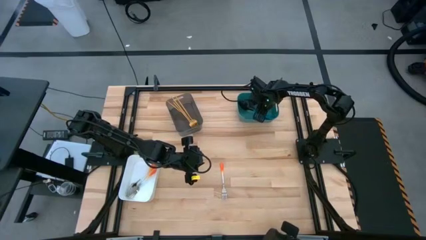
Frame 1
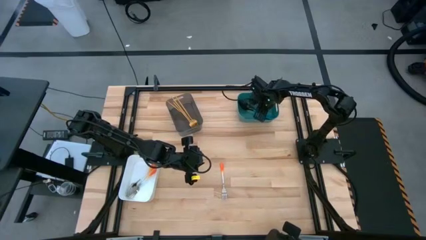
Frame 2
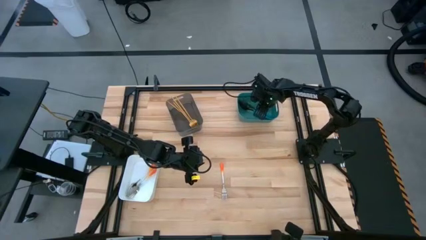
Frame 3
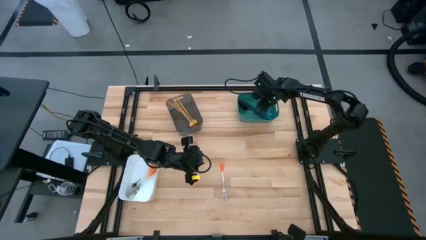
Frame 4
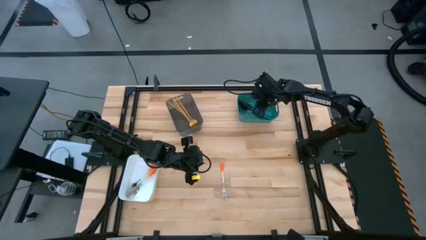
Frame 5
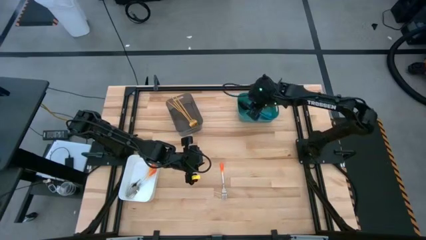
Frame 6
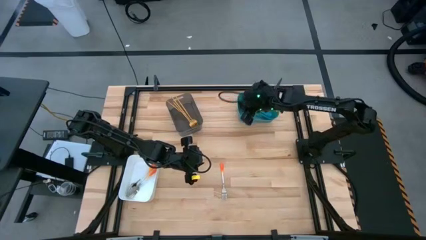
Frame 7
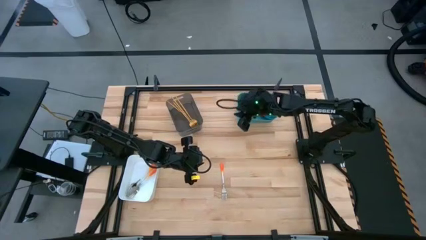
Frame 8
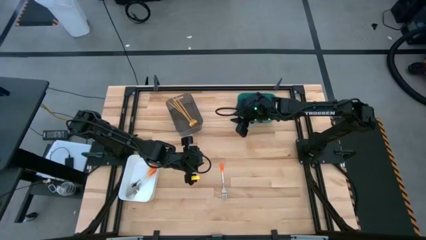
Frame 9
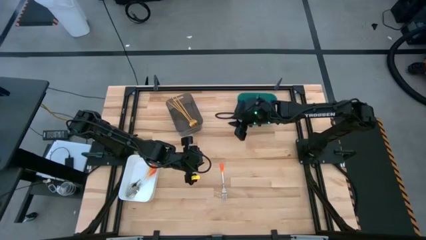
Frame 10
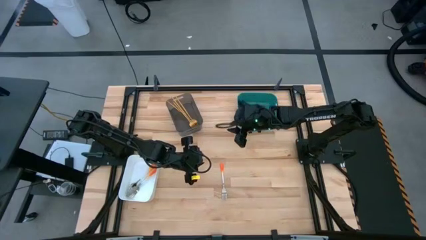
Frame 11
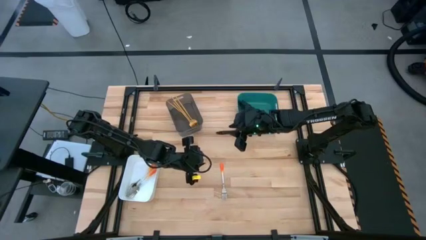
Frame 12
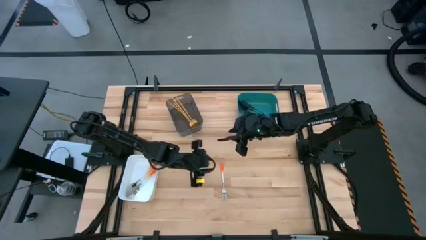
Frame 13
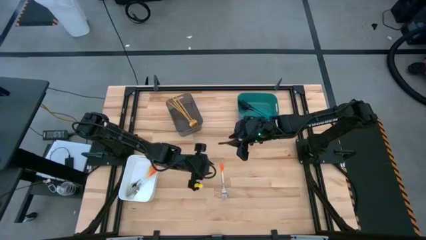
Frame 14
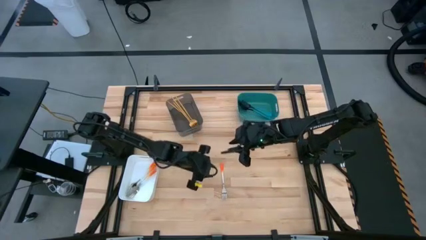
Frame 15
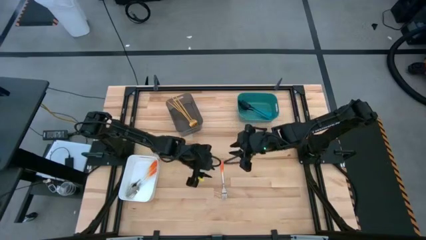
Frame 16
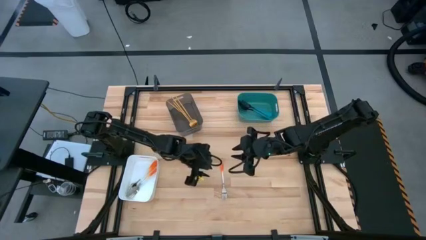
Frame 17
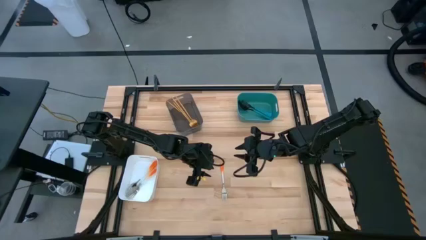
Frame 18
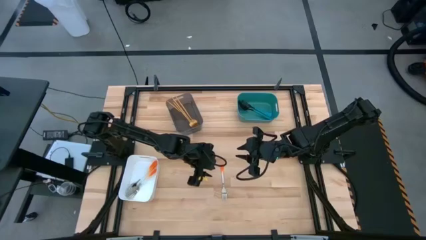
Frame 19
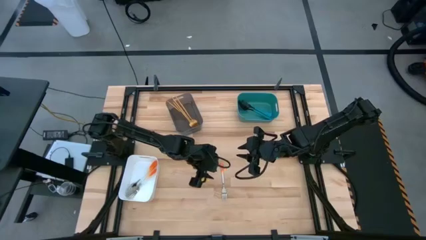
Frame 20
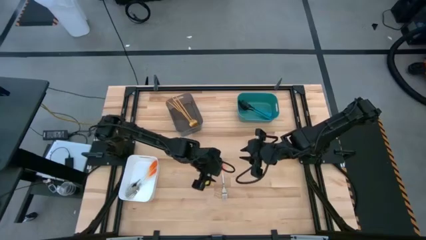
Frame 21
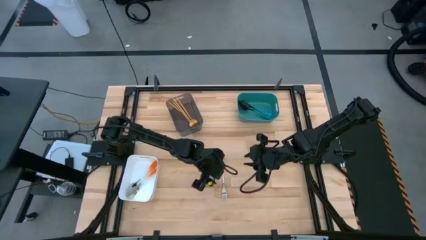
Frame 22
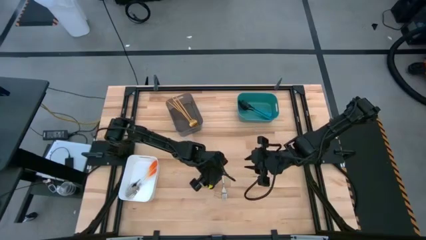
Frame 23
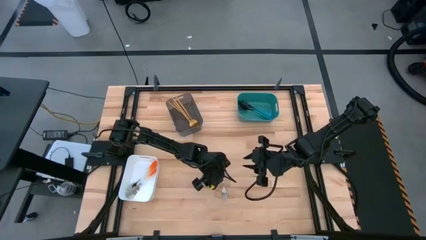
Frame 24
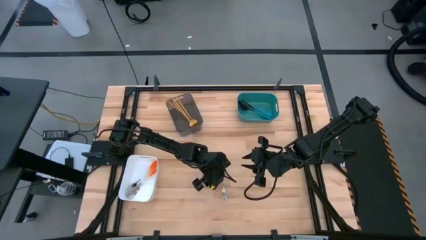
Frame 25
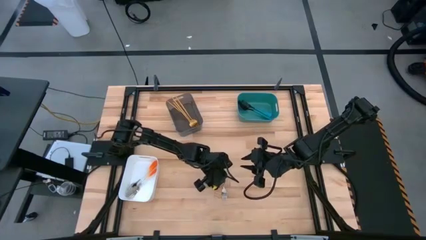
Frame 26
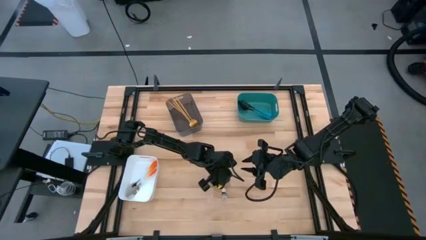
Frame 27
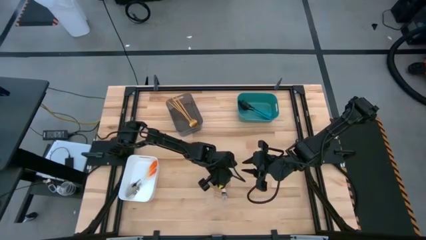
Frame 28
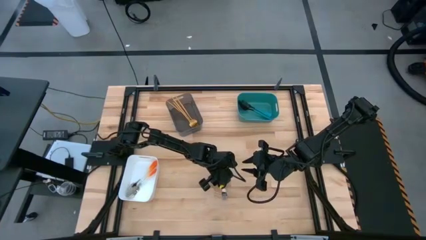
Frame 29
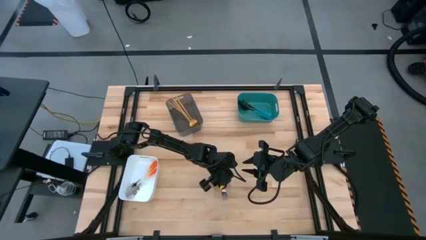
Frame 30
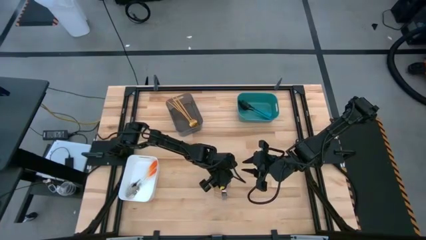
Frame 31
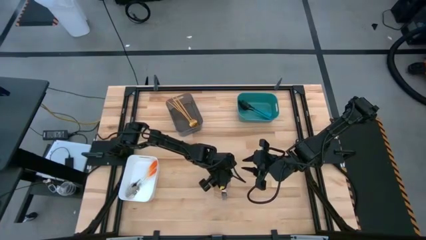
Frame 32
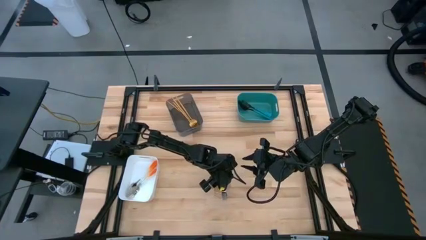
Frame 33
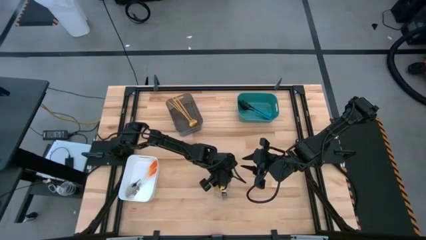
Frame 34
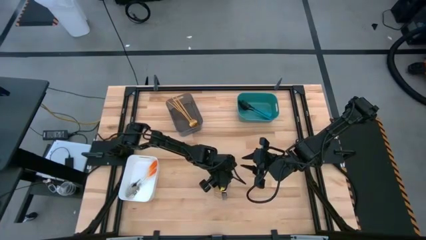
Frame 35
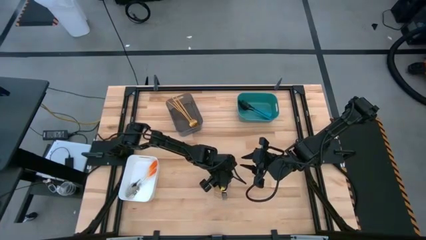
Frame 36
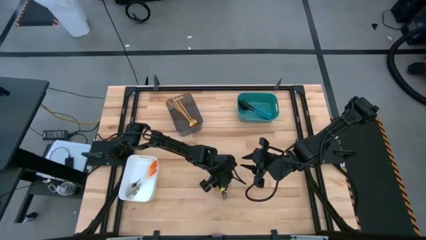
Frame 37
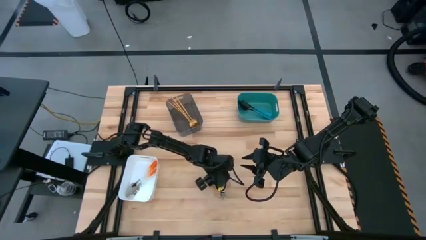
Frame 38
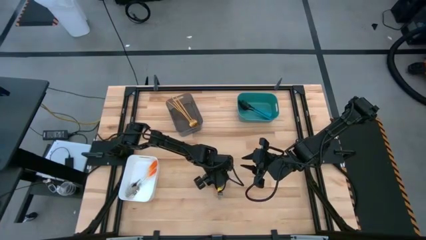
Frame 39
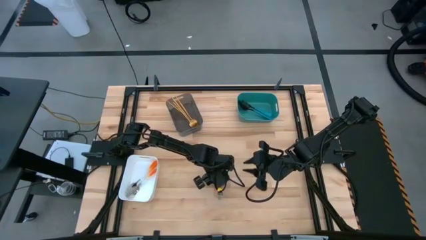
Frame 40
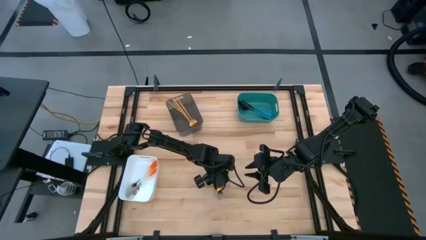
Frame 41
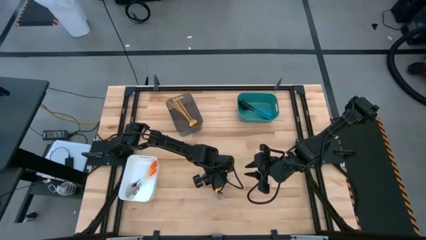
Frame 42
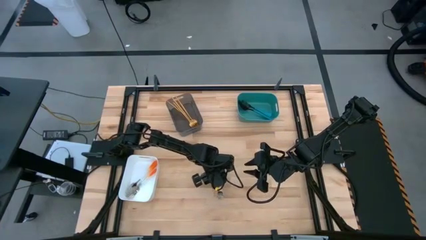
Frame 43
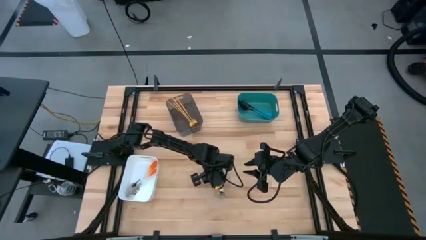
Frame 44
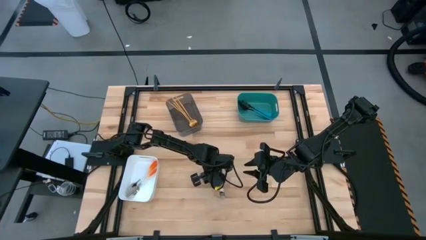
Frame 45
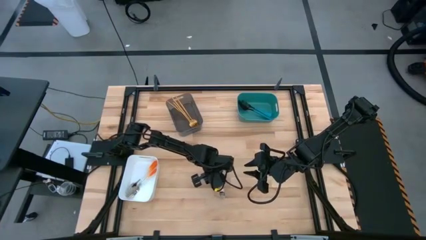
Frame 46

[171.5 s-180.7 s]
Task: Sort silverware by color (type)
Put the orange fork into the white bin

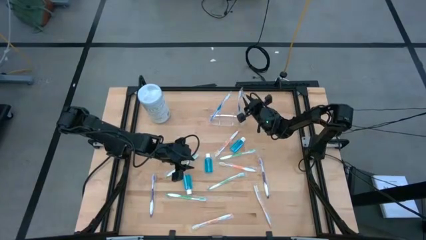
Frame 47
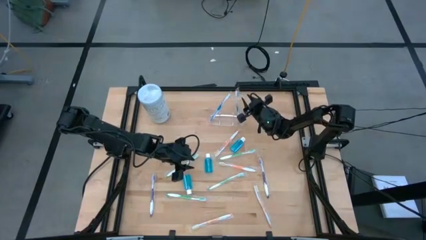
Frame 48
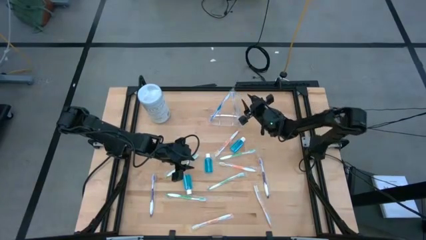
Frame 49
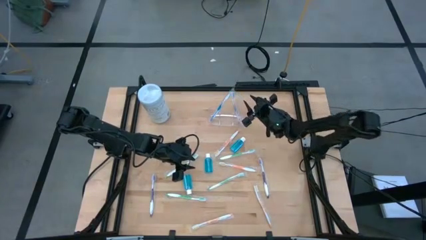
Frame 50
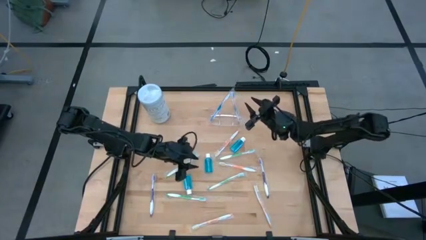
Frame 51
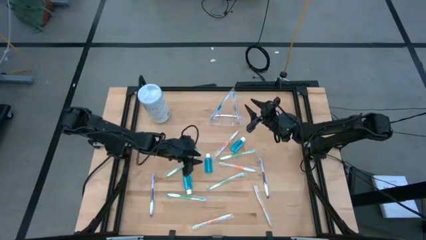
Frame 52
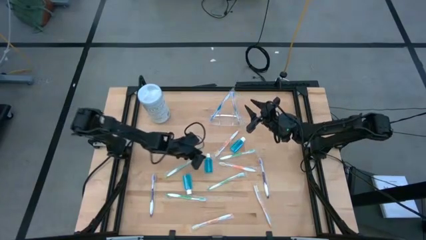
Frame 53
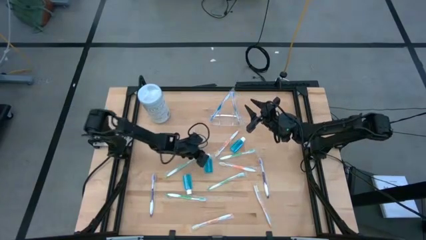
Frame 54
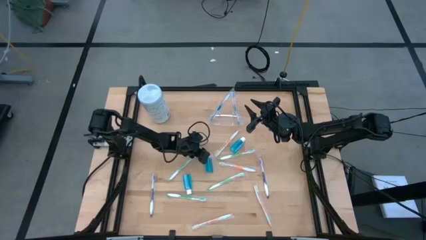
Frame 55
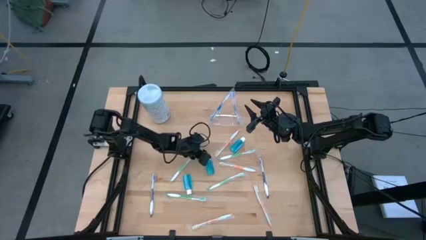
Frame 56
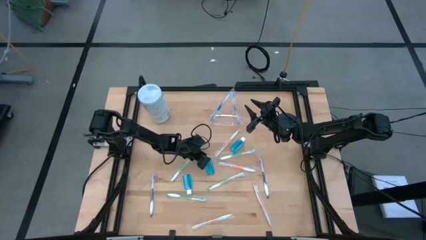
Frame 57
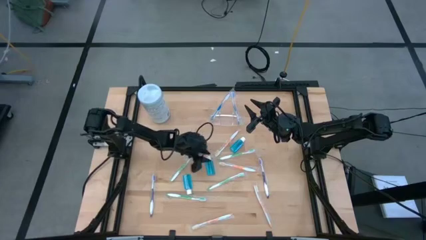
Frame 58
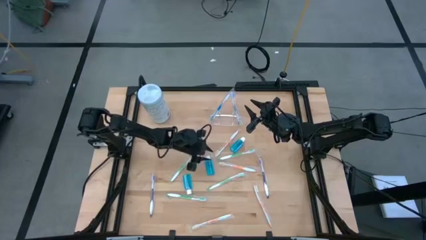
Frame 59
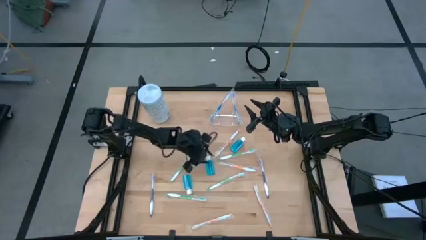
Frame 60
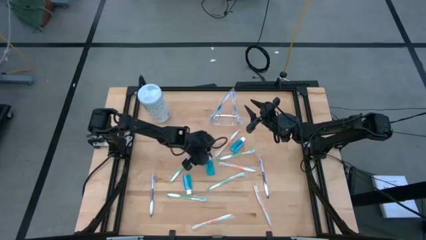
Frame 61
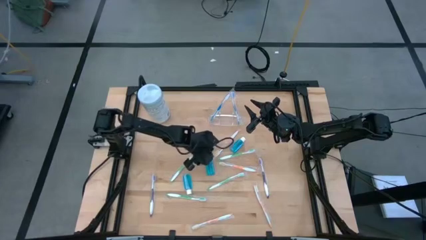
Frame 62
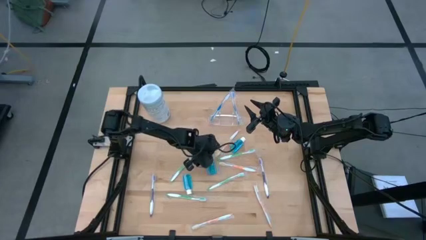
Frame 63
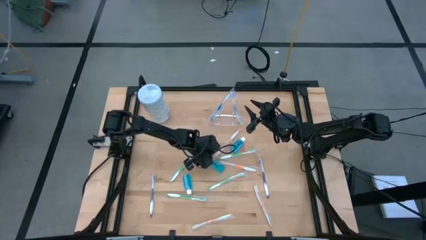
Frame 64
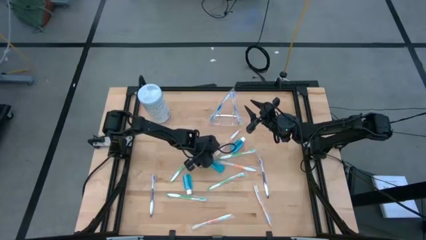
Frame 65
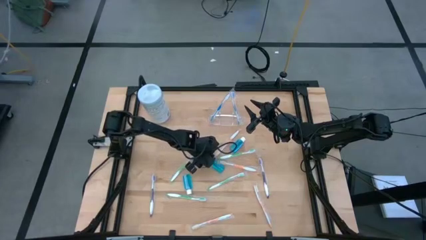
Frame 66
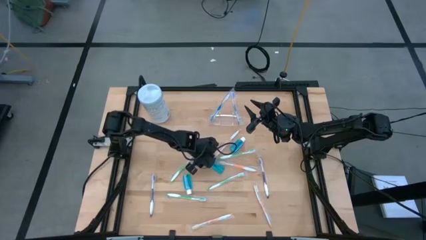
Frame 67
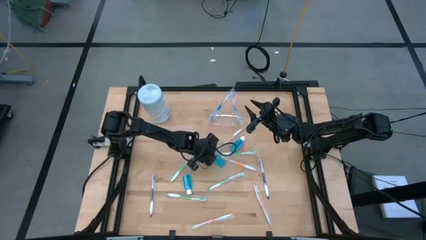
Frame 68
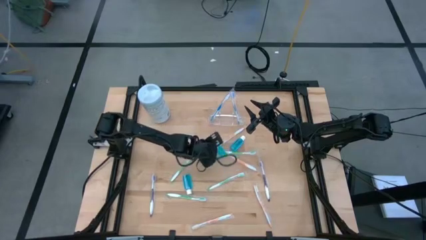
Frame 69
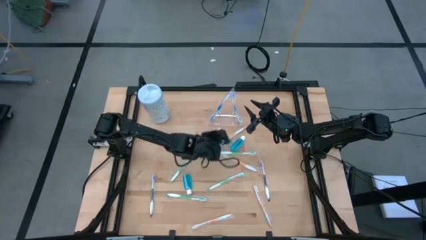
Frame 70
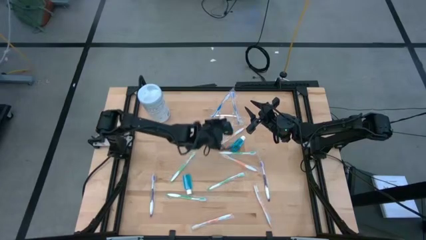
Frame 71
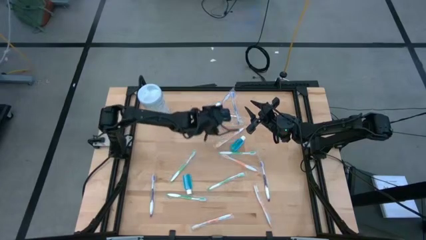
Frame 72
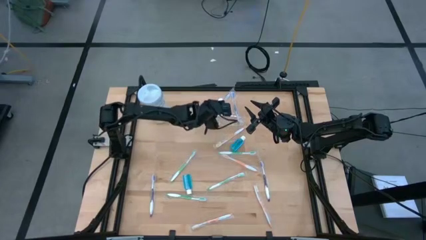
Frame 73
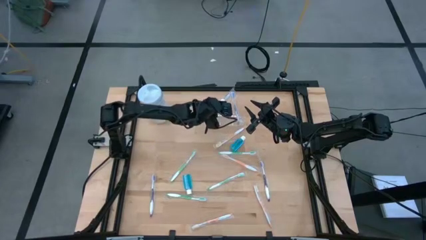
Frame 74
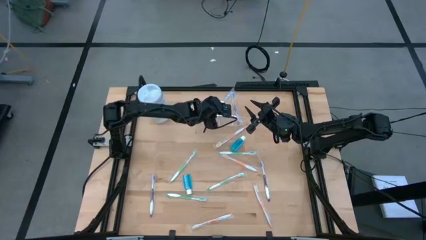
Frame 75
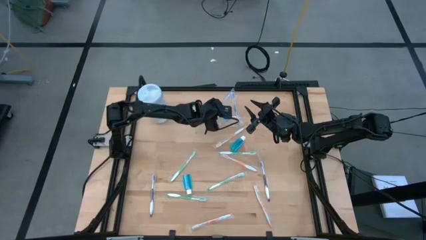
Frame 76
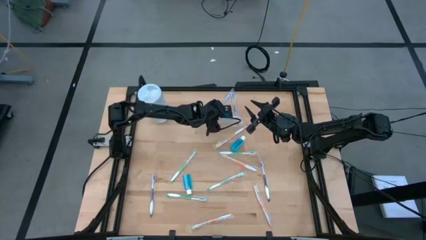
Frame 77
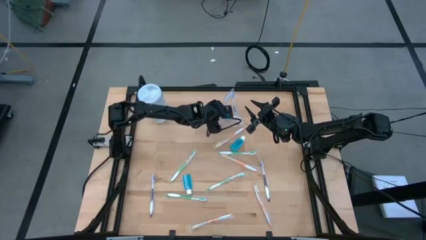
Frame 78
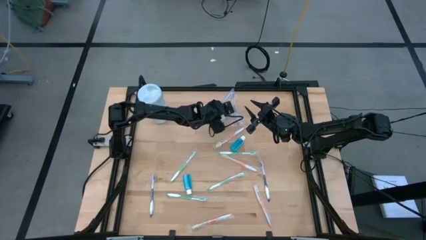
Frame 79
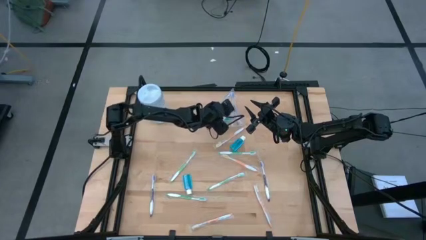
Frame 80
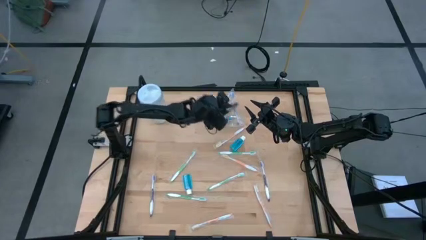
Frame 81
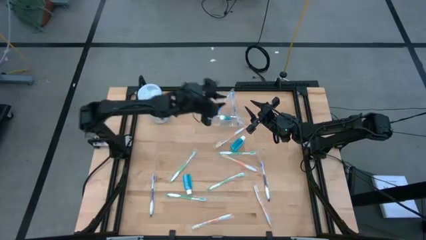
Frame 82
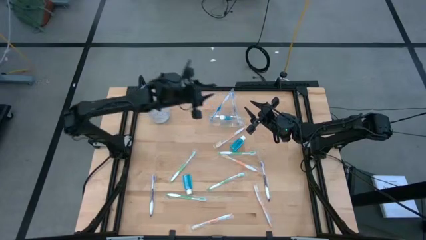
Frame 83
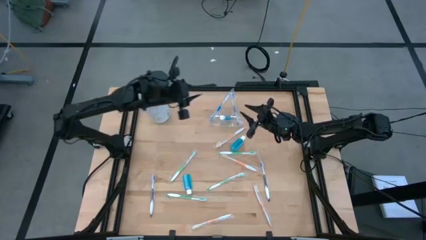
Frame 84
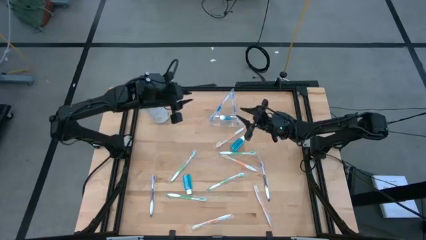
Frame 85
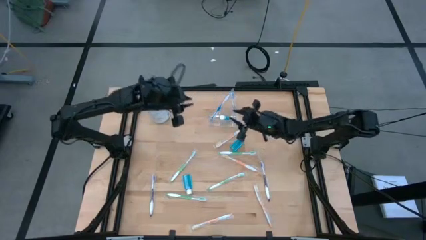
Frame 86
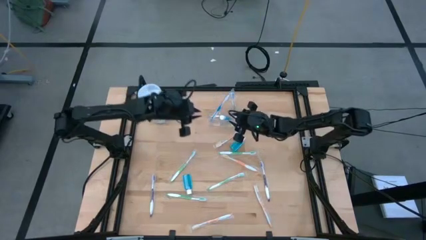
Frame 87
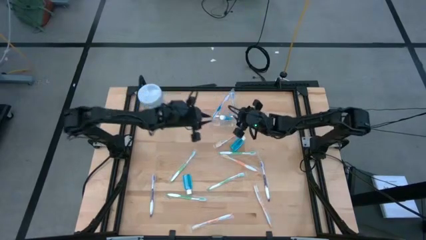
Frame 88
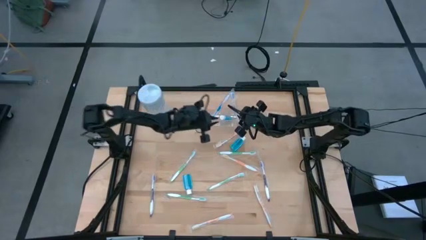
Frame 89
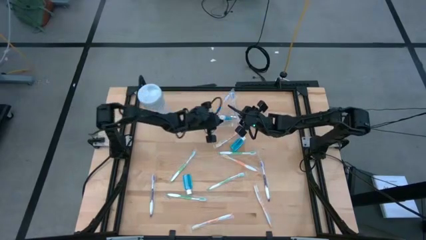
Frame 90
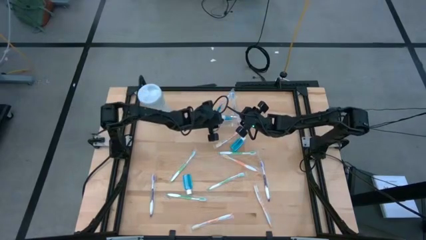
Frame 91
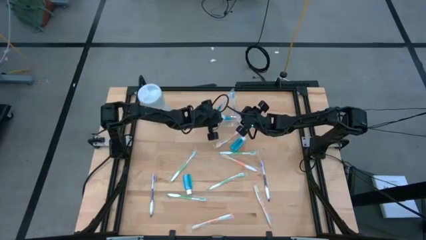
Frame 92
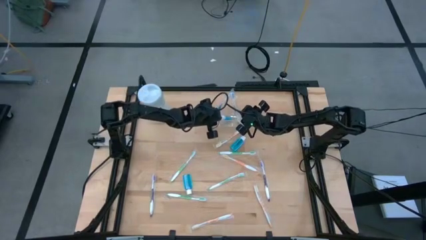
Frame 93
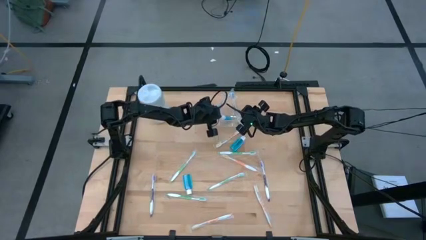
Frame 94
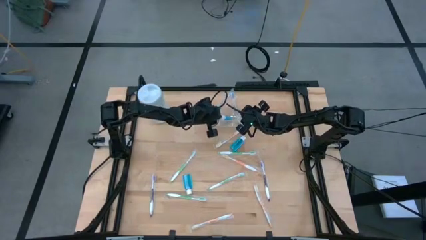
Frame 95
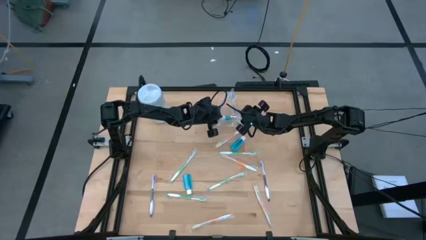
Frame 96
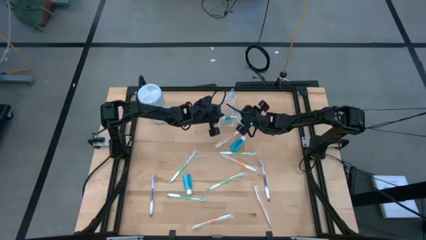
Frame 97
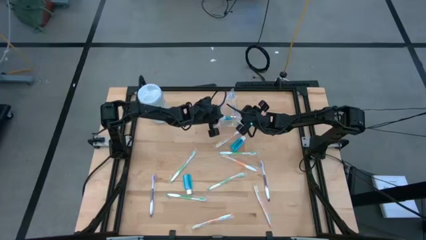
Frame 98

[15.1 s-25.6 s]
Task: Pick & Place toothbrushing station
Put the mouthwash into the transparent organizer
